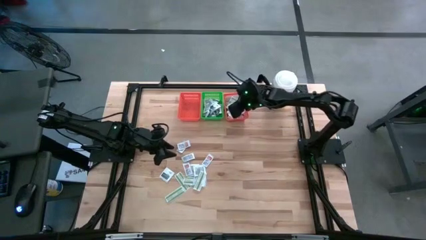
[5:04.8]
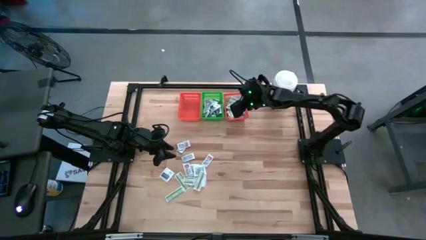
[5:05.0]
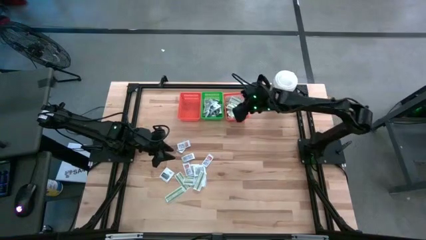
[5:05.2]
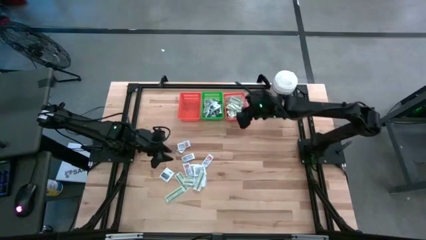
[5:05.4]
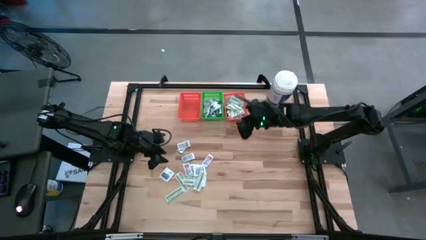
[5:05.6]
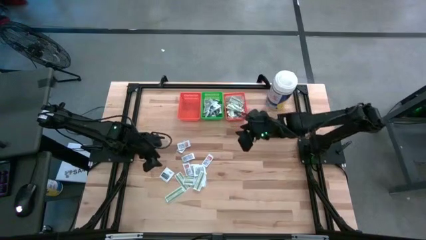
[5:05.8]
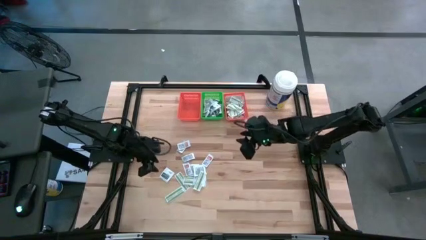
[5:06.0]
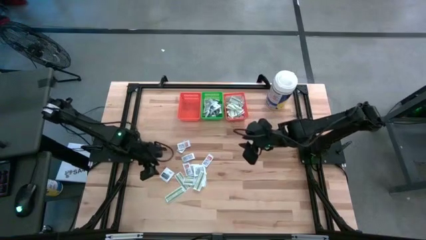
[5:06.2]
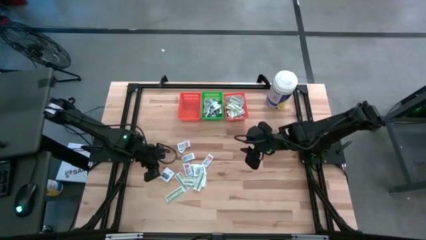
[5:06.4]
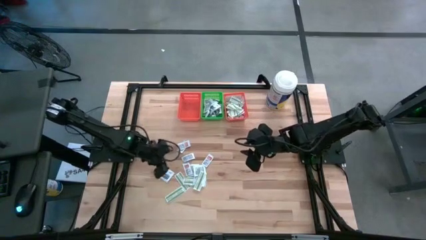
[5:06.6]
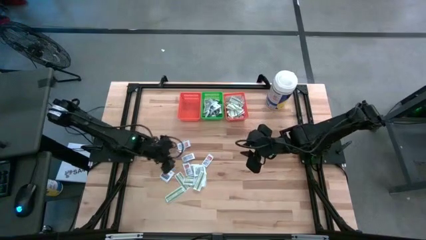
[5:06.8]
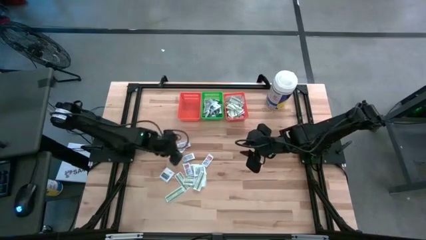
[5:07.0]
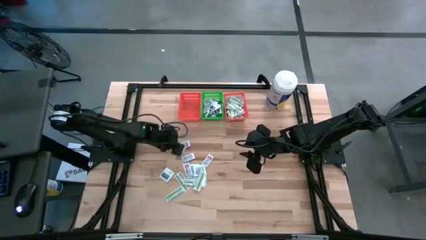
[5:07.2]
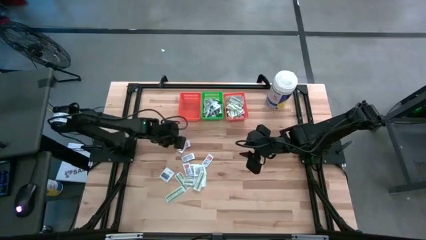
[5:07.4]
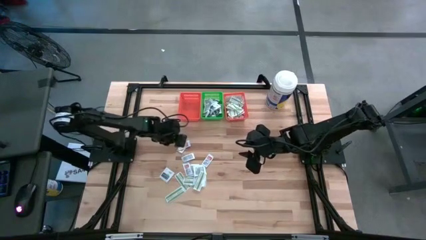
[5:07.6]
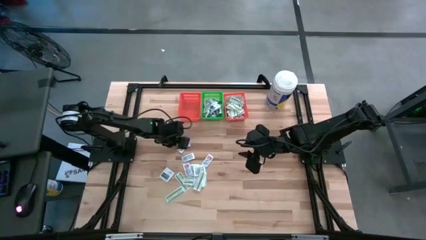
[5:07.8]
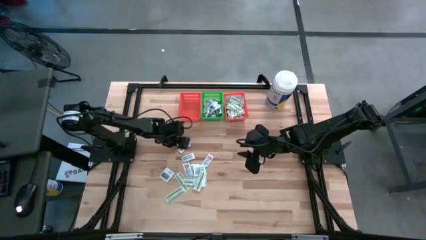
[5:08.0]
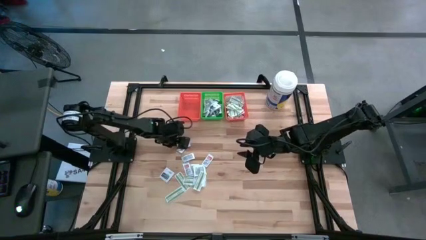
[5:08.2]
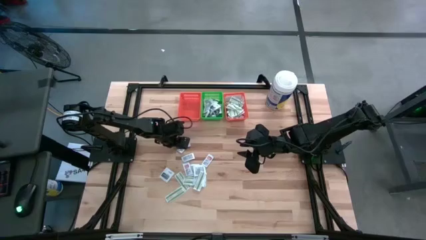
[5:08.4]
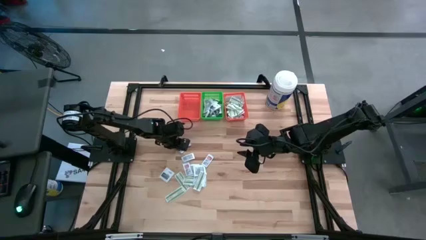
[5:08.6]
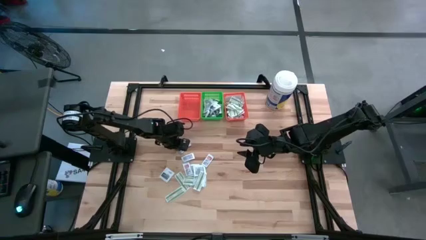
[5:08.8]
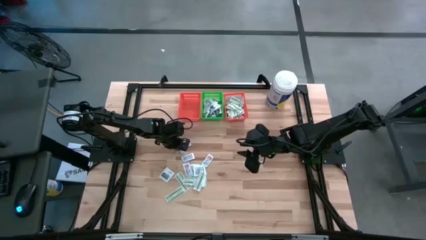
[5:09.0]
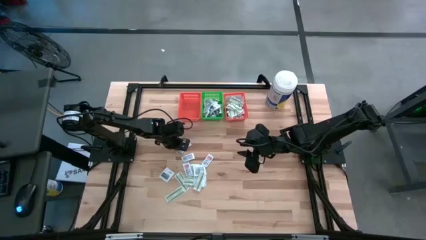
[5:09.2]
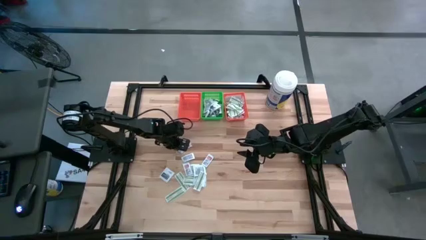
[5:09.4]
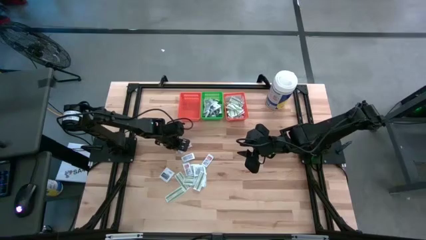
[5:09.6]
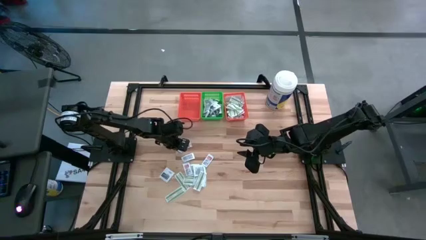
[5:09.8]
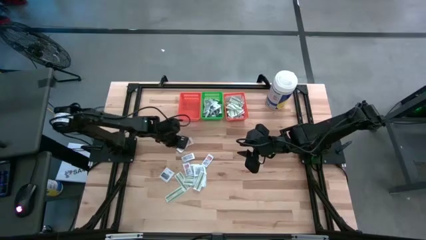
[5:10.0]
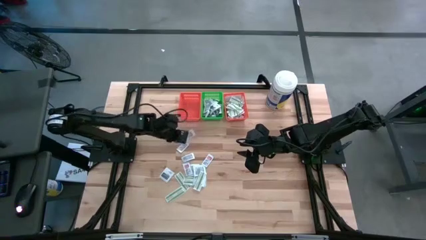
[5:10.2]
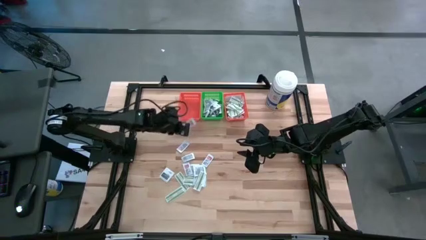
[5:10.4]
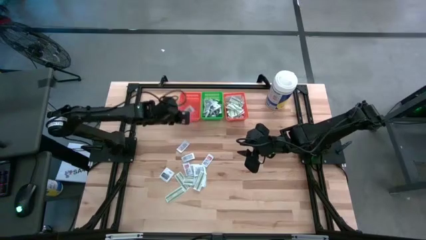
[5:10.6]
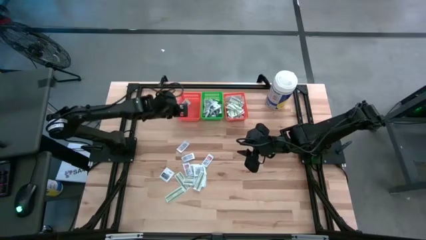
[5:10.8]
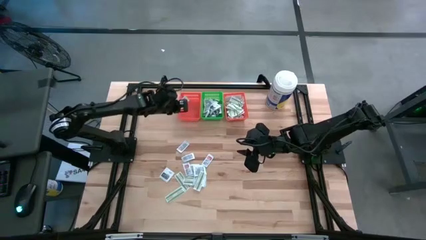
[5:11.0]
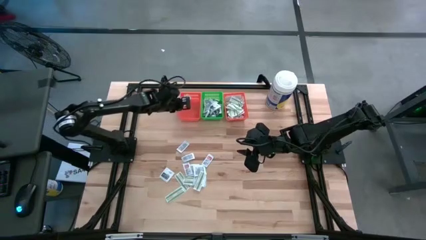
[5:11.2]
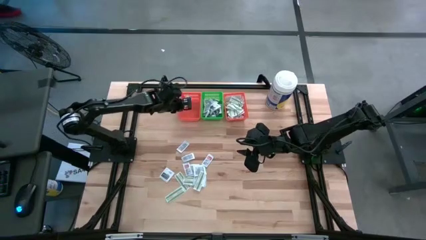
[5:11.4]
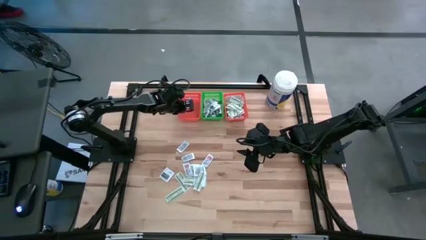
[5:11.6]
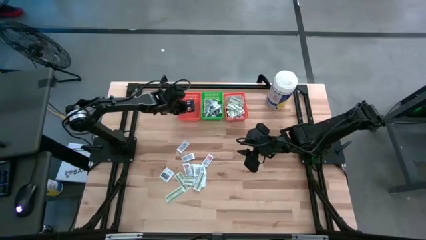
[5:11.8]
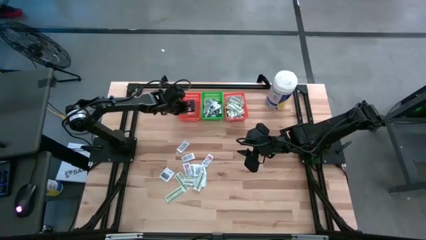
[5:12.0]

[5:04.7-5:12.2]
Task: Pick & Place First Aid Supplies
Put the ointment pack into the left orange bin

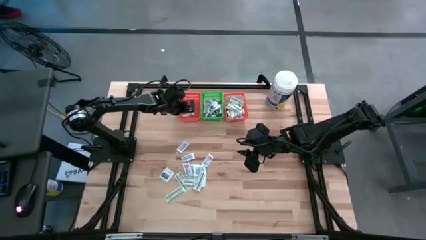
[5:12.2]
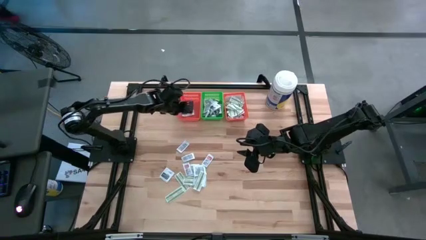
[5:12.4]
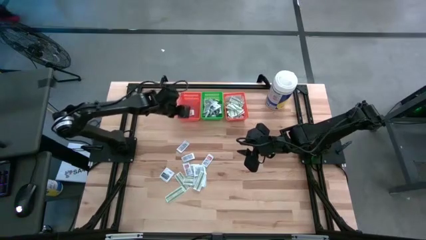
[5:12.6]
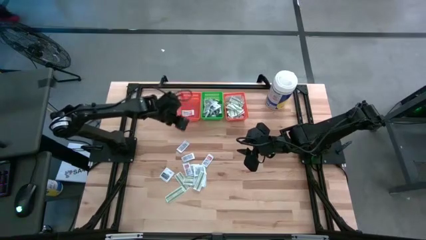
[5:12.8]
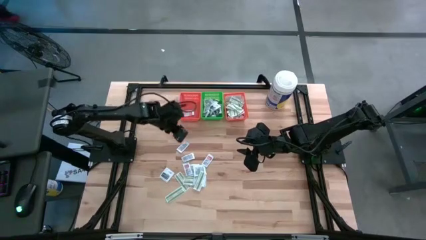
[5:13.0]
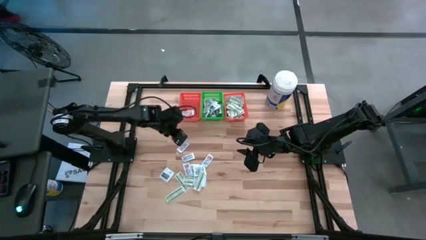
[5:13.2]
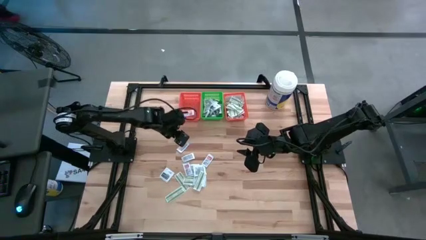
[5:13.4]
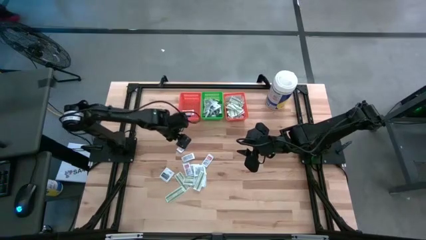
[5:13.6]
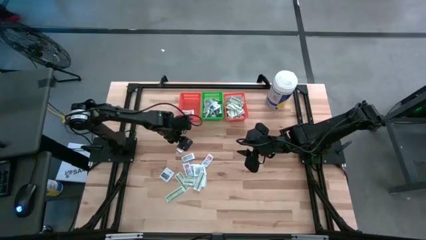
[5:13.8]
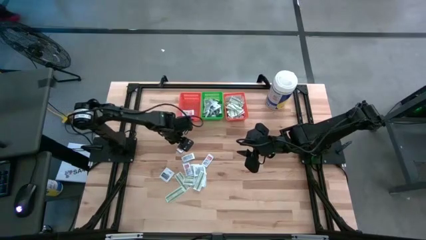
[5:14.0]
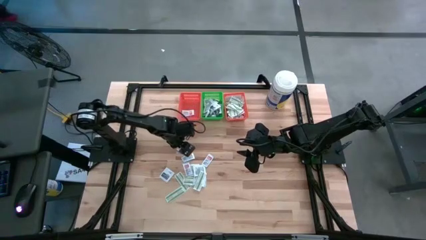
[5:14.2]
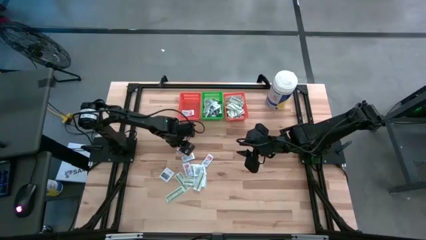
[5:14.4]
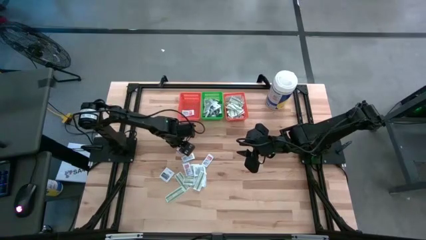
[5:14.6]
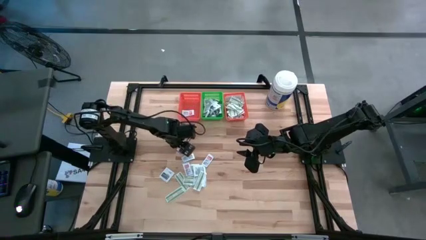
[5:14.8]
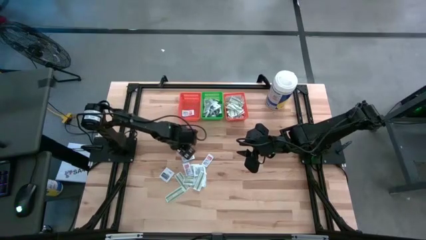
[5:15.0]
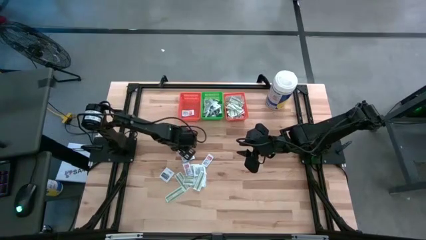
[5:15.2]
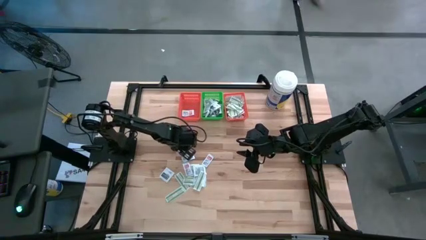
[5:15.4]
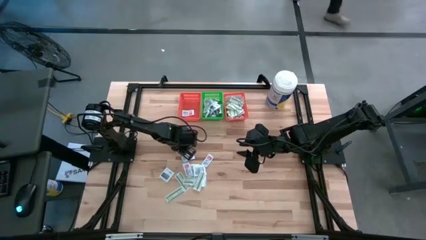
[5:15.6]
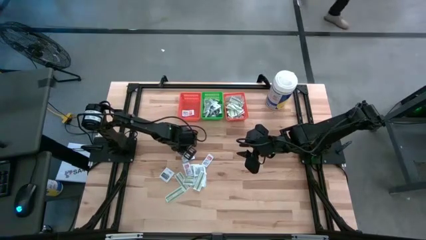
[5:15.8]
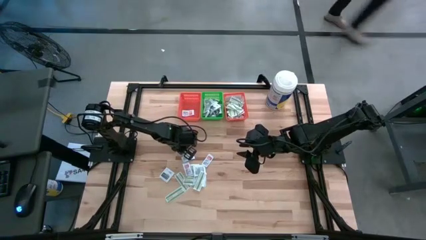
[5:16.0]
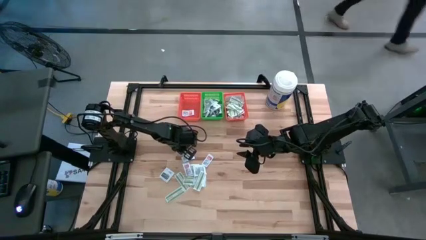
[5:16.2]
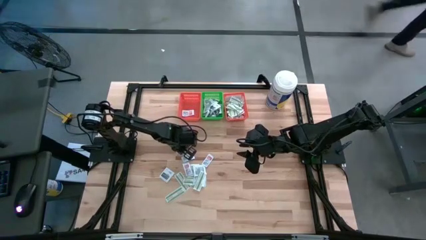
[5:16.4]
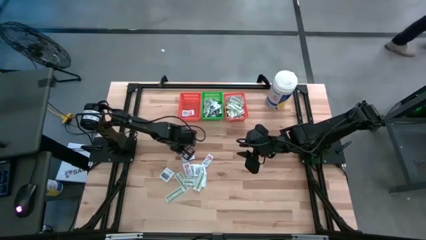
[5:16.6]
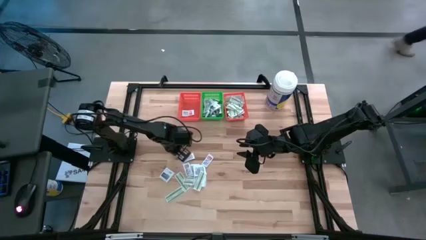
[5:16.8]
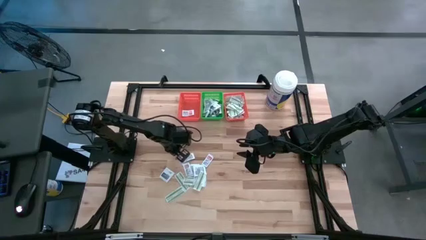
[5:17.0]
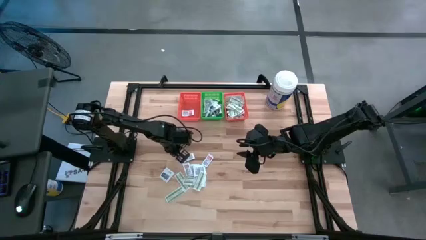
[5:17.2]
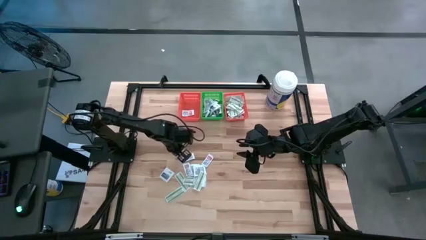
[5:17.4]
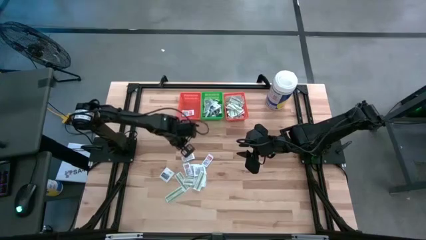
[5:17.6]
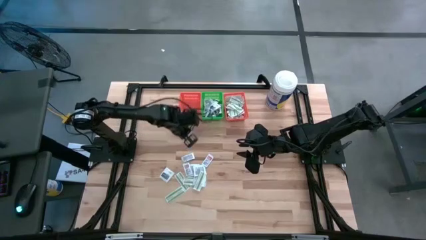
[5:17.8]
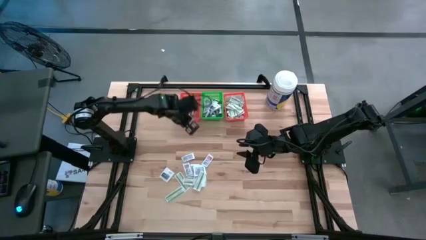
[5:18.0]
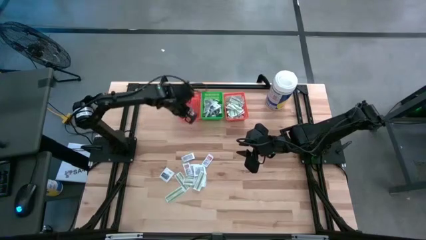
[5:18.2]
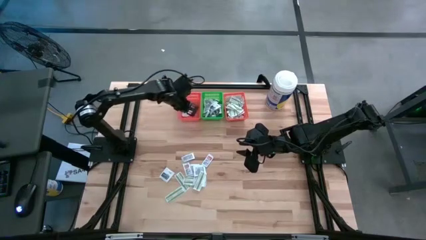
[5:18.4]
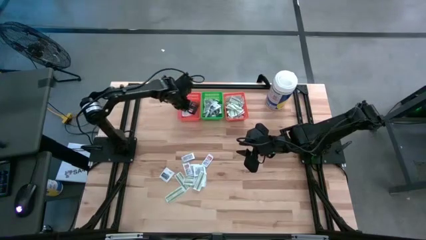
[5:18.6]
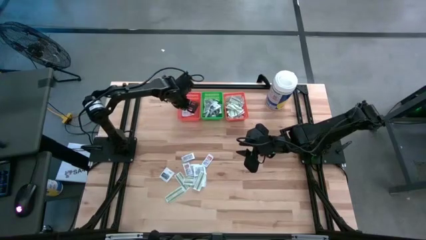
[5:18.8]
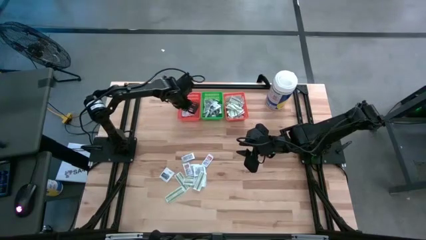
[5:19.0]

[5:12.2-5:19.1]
Put the ointment pack into the left orange bin
